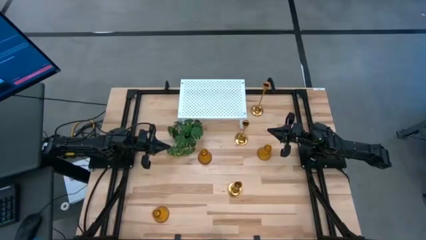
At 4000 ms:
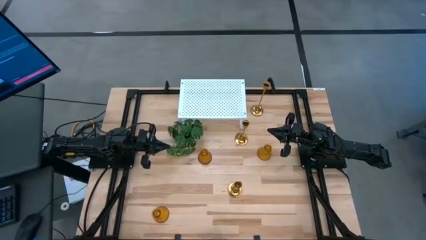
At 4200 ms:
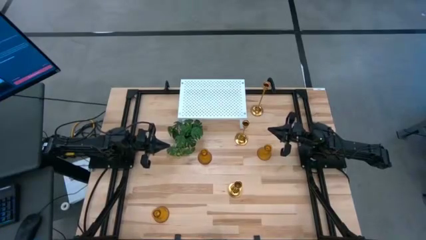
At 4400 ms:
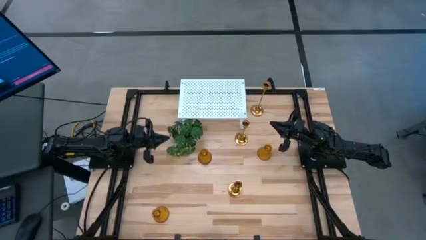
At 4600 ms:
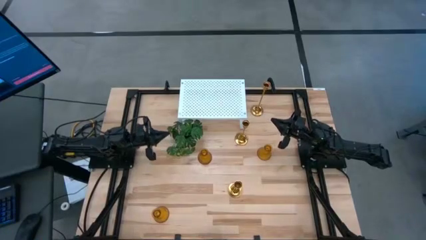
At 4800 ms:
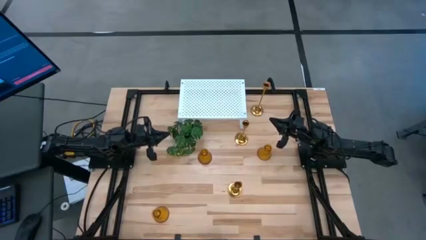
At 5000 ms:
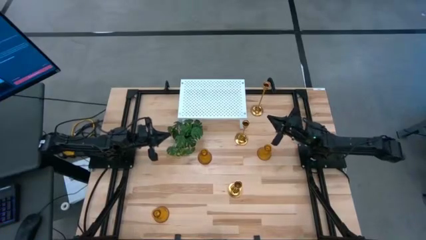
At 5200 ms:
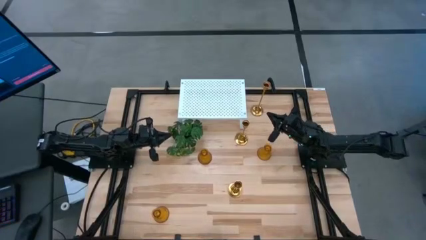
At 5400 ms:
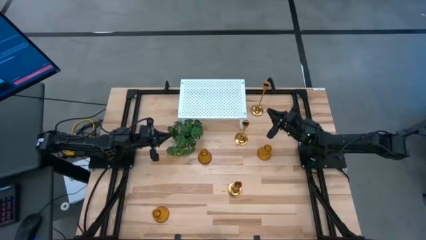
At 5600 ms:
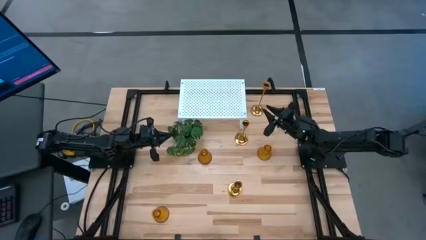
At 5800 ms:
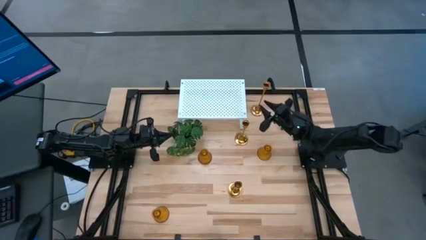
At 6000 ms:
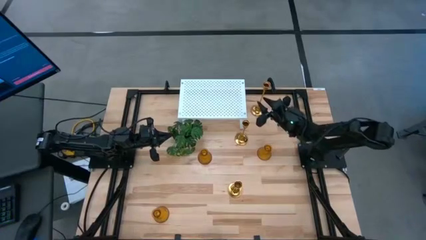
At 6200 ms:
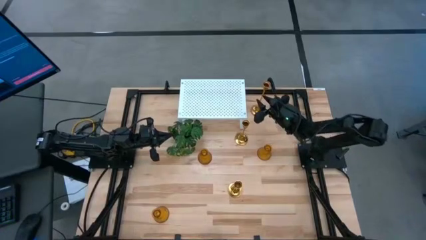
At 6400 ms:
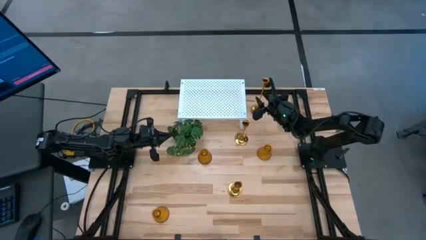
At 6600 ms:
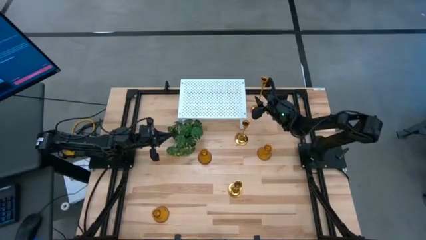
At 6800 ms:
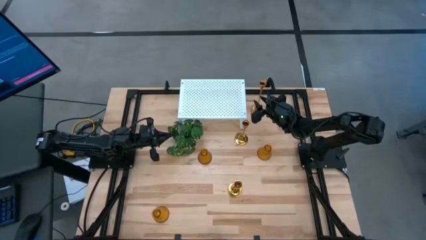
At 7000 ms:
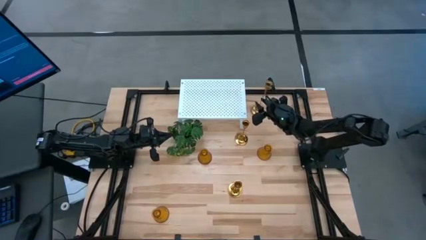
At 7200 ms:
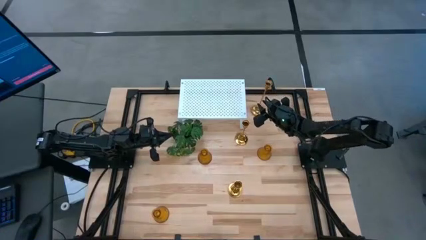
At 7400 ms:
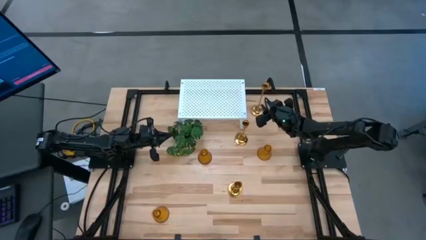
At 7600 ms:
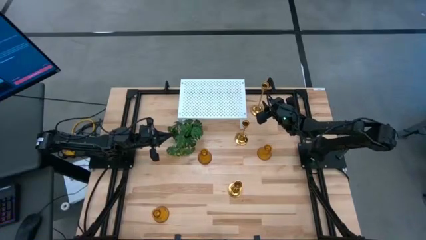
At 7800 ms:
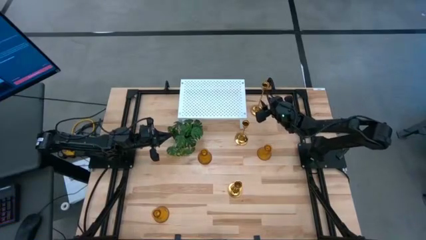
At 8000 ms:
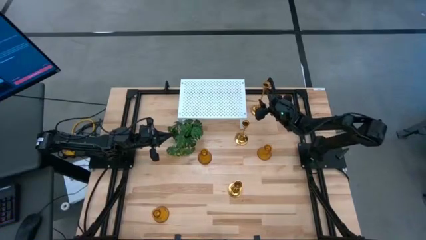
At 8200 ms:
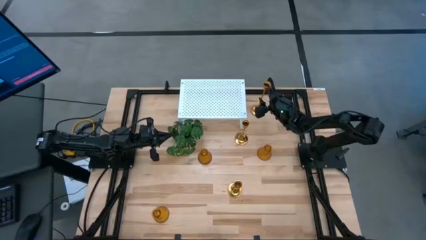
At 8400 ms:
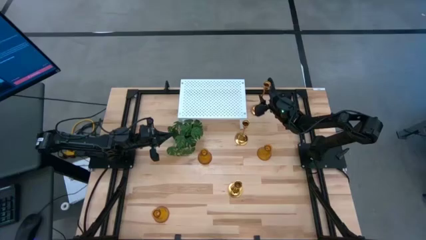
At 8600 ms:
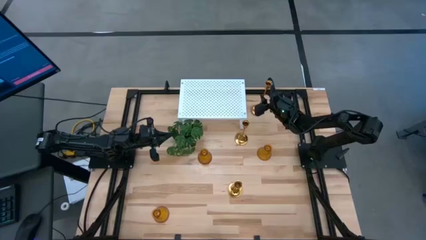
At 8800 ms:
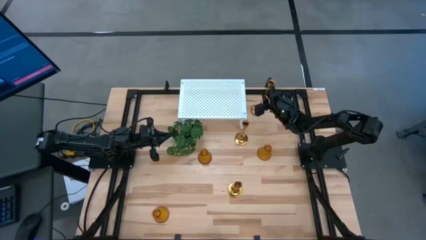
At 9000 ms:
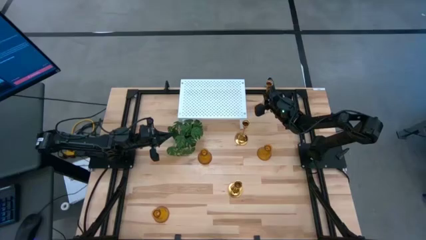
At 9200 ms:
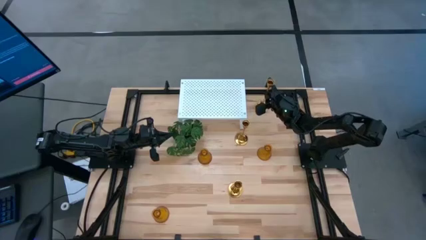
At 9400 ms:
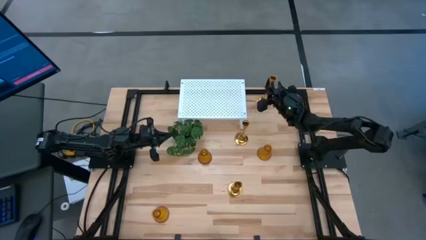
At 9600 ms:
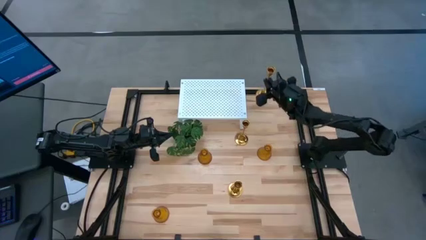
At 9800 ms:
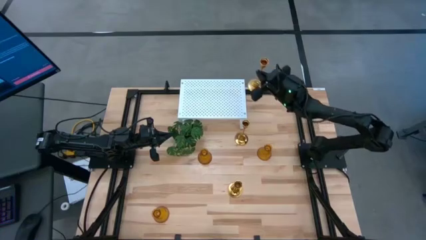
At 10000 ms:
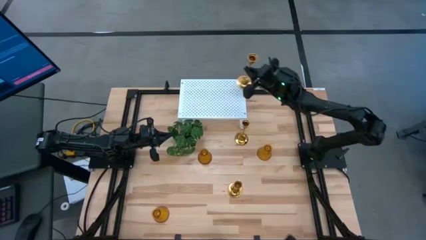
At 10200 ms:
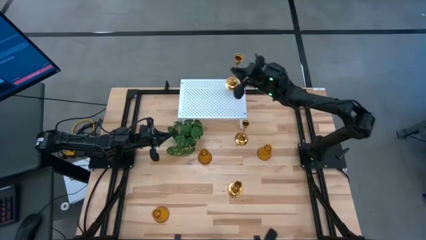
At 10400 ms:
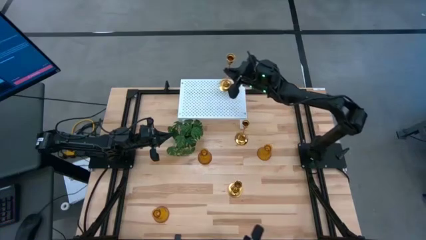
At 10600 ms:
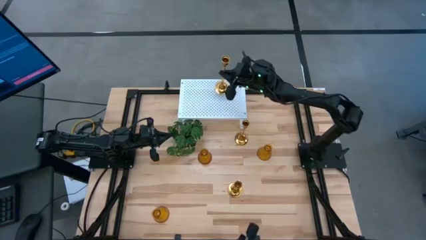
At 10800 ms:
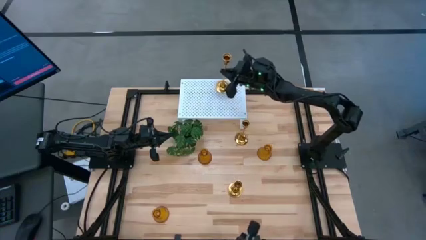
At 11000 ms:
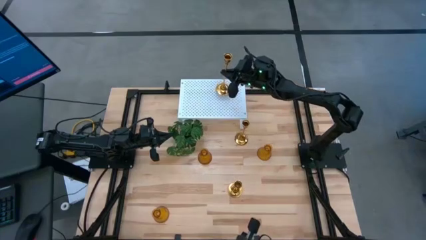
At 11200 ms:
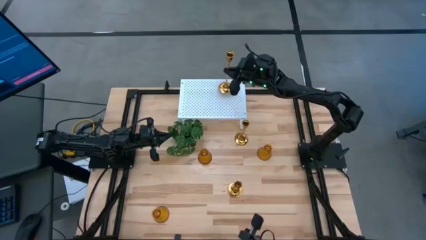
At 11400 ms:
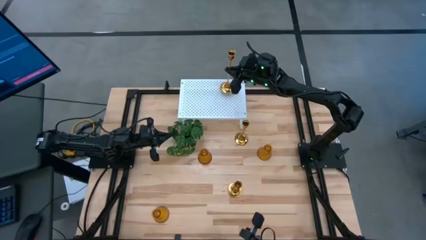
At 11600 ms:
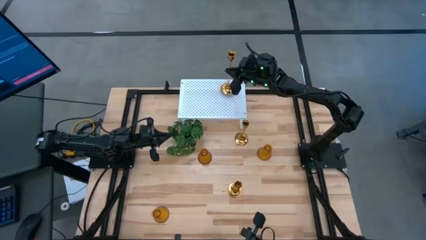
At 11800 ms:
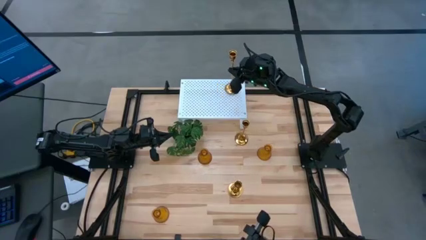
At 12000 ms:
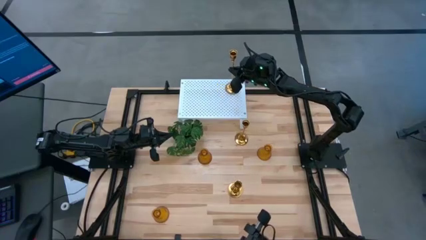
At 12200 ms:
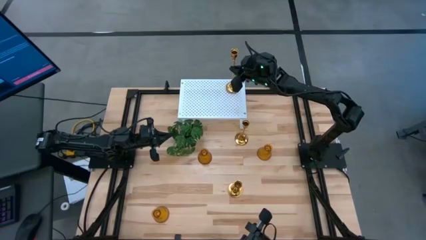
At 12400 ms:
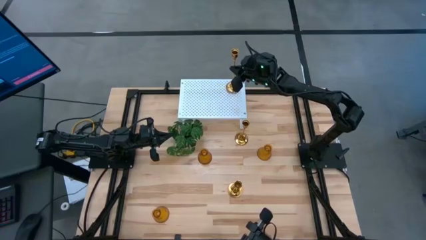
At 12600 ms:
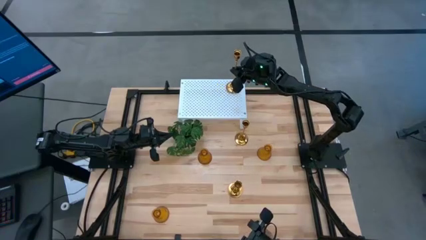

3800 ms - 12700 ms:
Task: Pick & Place candle stick holders
Put the top gold candle holder on the shelf

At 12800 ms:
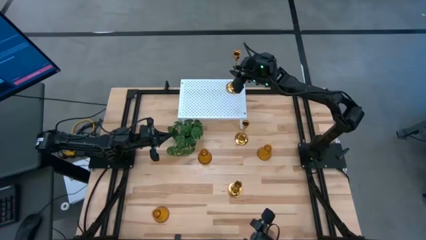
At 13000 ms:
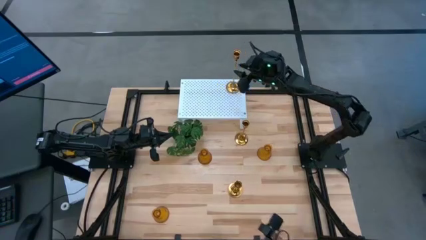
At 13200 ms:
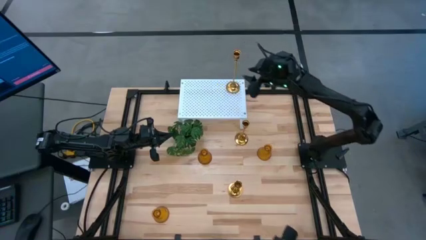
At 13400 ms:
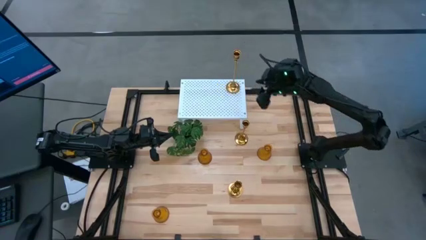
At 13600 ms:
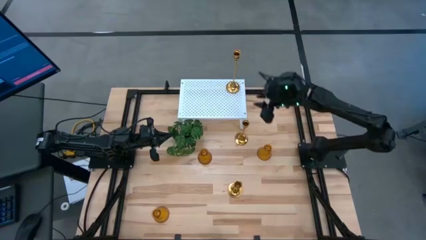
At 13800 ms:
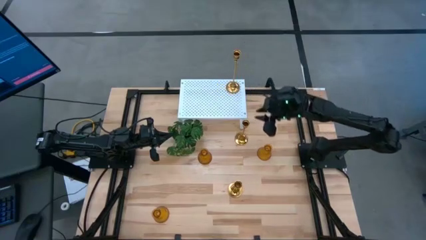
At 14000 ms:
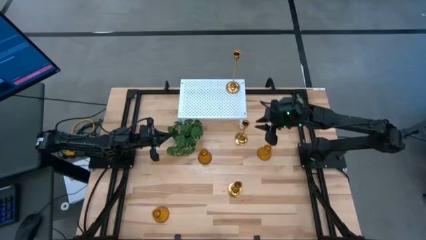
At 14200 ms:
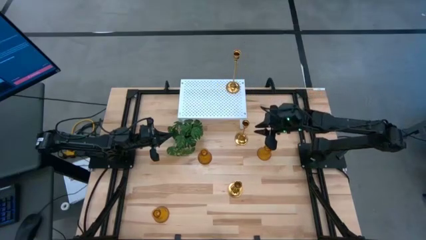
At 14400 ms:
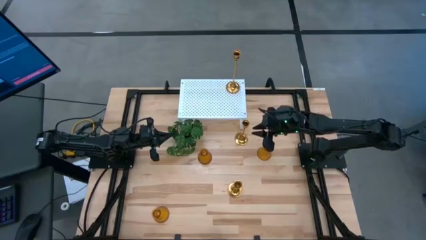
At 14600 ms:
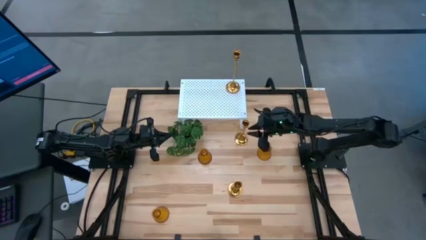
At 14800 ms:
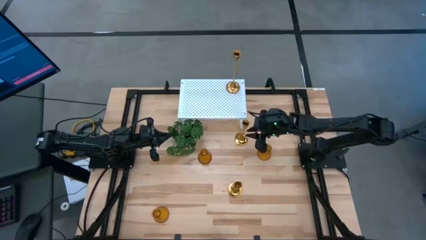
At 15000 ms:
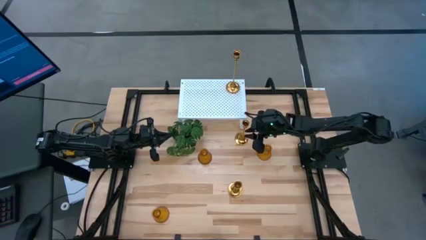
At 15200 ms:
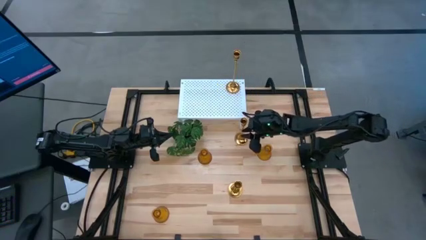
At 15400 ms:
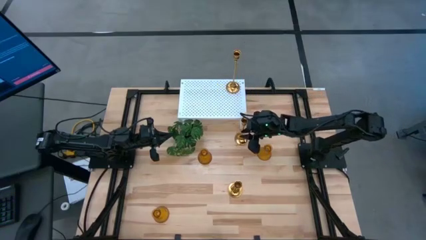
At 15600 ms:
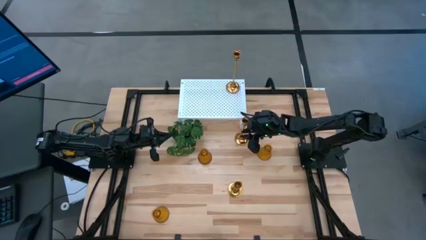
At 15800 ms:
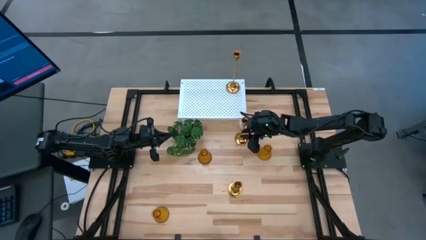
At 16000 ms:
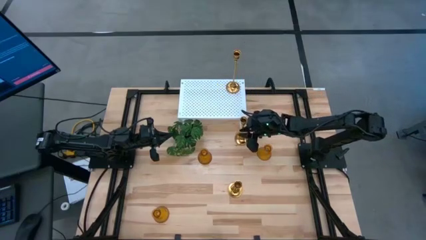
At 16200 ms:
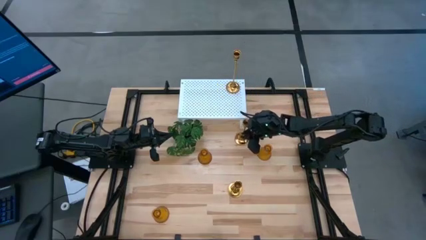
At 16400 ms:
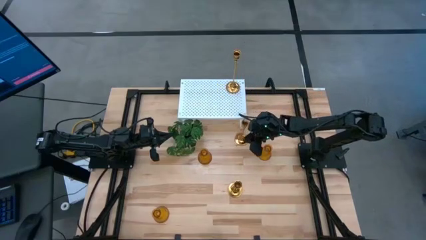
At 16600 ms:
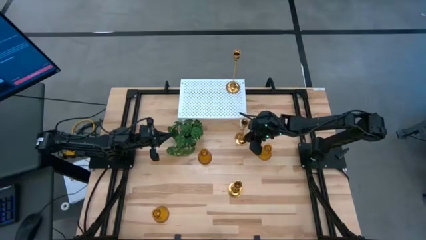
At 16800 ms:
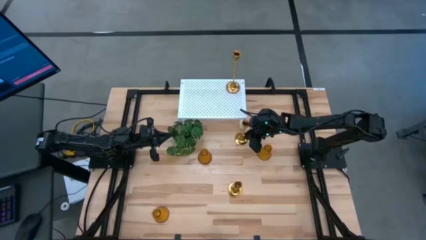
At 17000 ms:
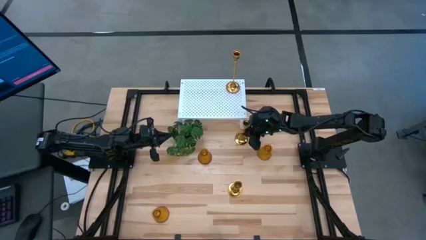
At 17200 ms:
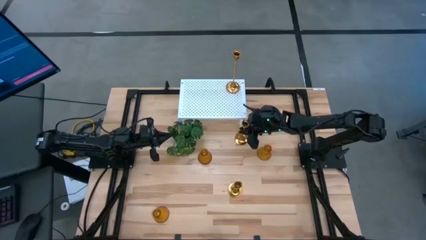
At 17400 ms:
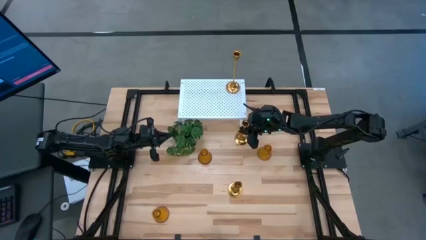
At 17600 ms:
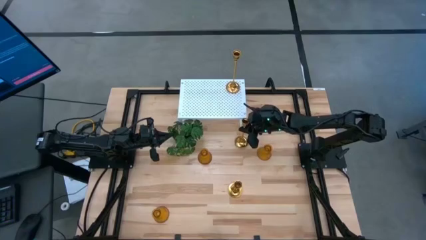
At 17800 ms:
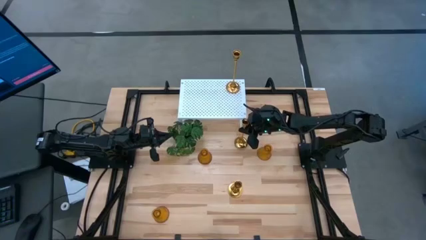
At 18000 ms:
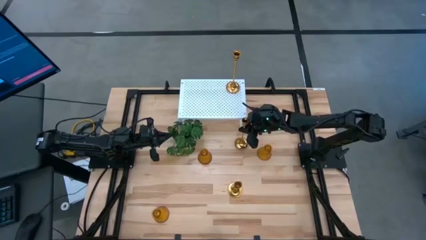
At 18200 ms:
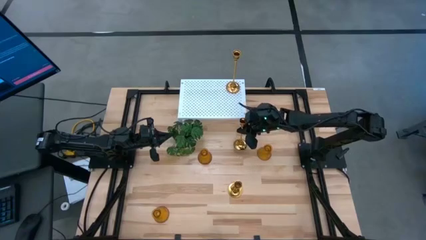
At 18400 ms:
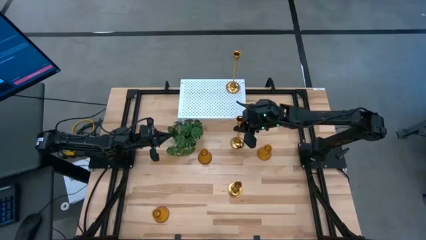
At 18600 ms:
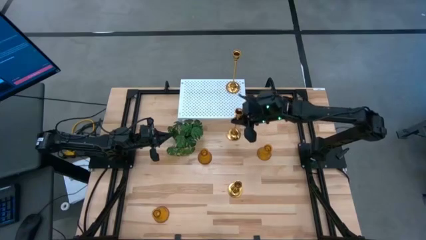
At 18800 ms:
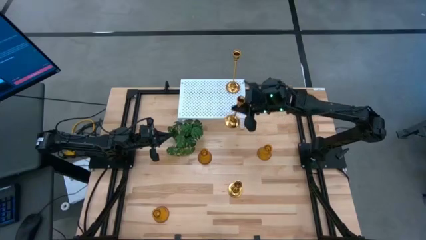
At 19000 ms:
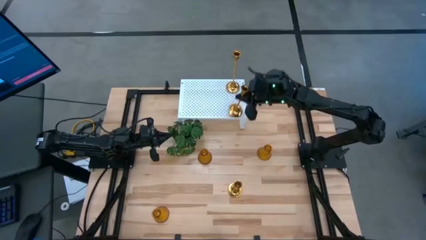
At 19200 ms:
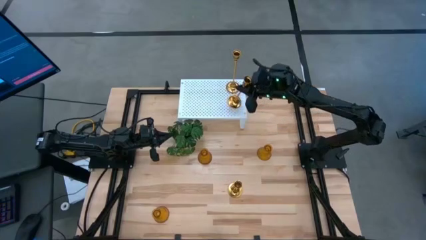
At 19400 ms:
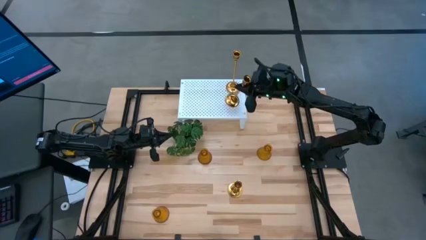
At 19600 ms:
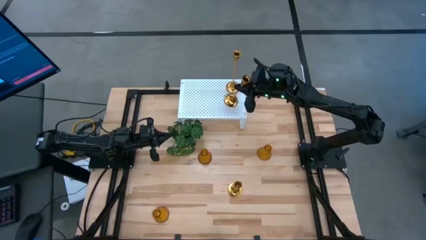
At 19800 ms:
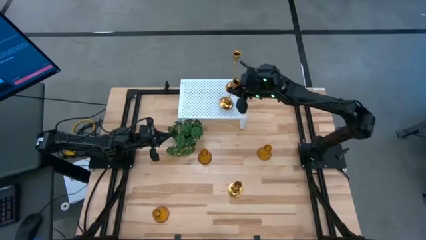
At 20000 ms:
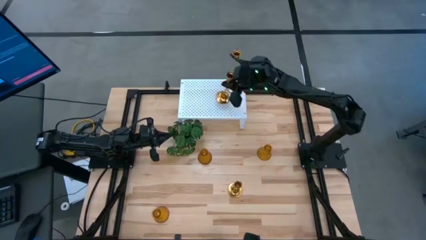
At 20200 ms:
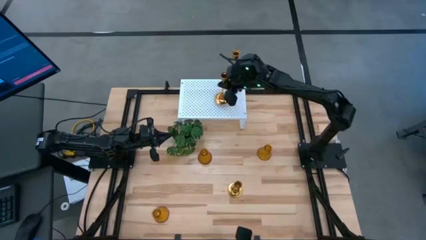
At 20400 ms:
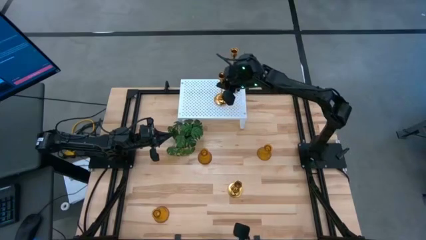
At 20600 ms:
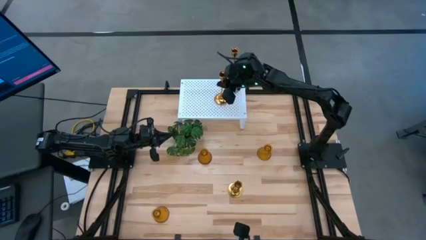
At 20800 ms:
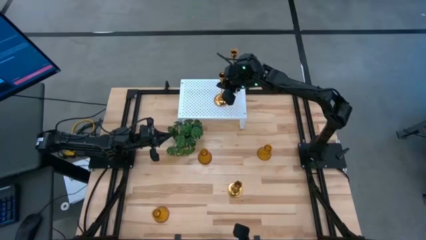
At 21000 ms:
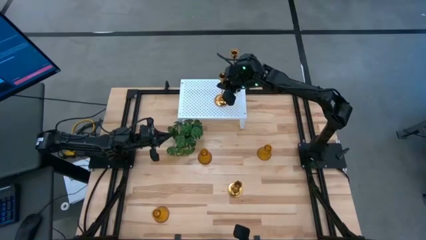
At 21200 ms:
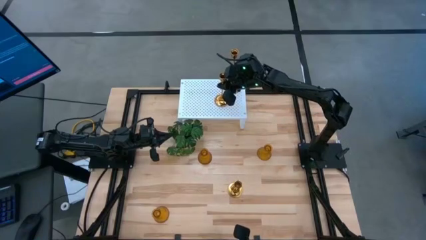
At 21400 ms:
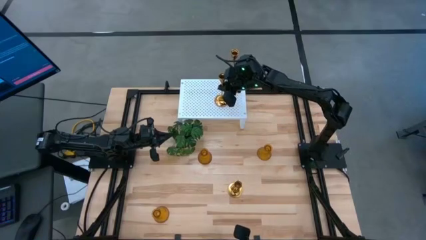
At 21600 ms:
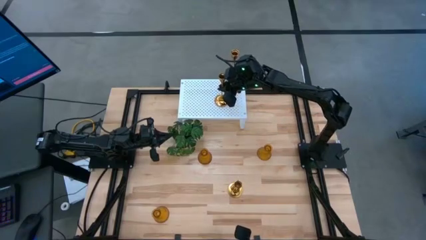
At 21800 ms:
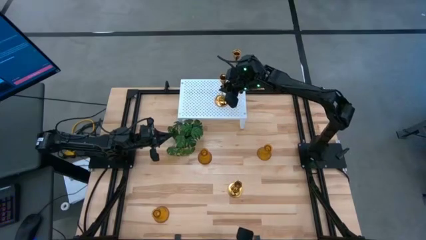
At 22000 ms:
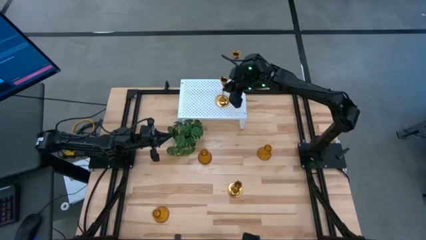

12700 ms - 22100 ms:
Put the top gold candle holder on the shelf
